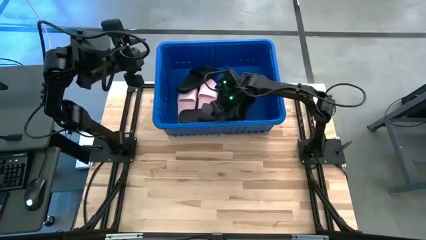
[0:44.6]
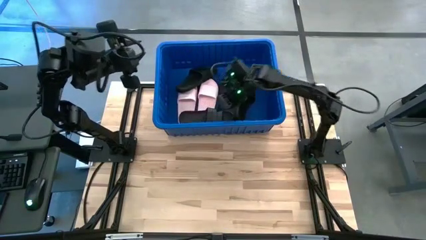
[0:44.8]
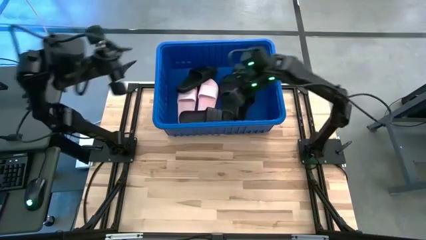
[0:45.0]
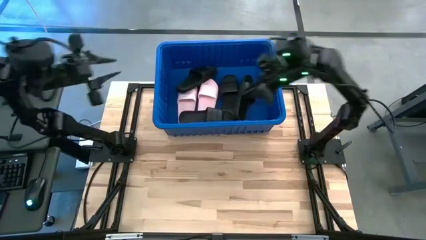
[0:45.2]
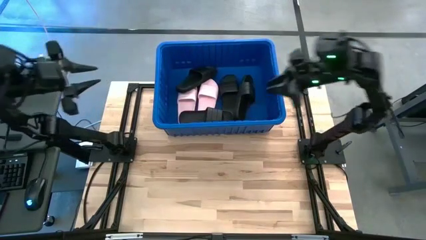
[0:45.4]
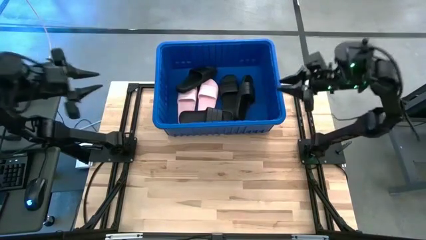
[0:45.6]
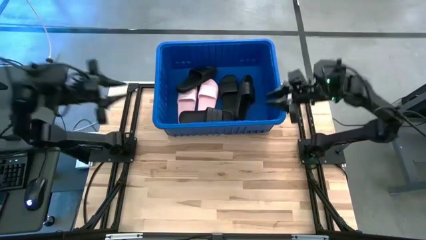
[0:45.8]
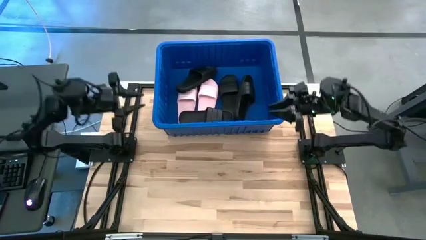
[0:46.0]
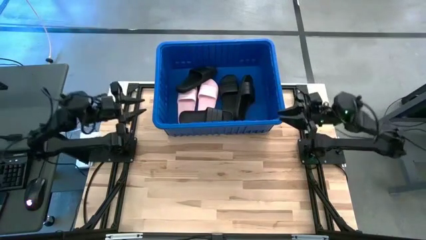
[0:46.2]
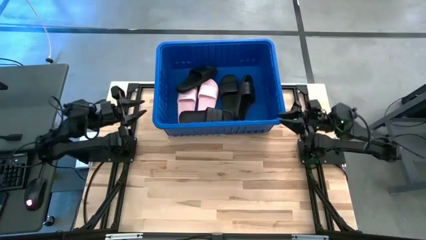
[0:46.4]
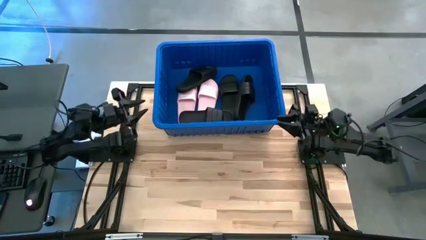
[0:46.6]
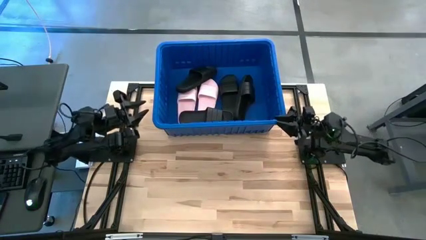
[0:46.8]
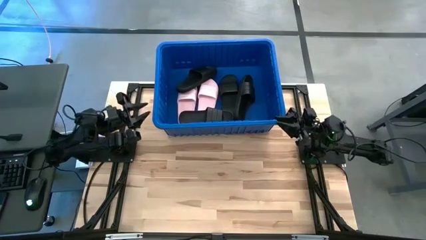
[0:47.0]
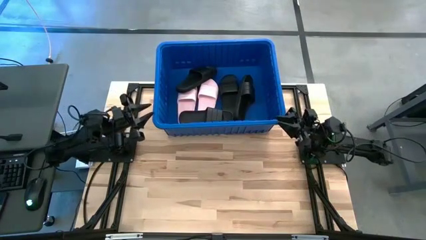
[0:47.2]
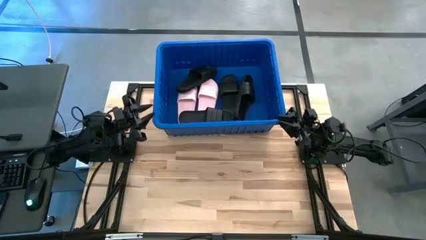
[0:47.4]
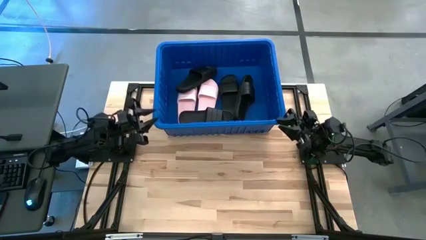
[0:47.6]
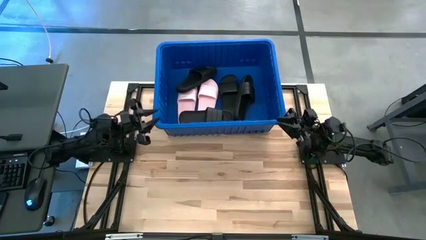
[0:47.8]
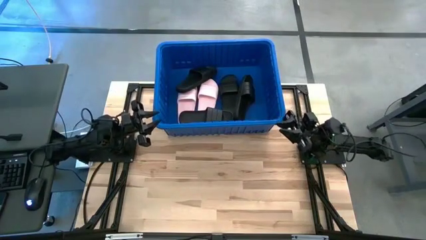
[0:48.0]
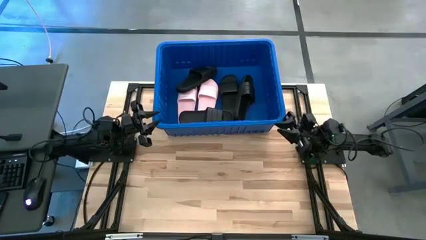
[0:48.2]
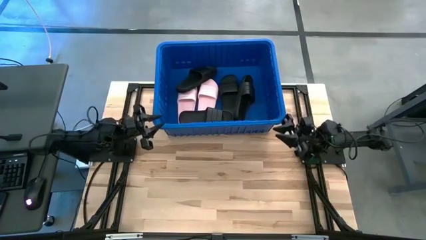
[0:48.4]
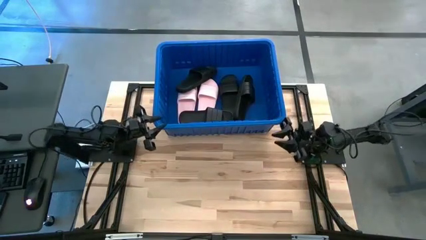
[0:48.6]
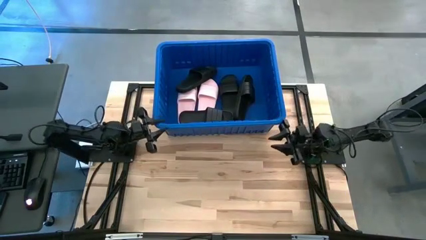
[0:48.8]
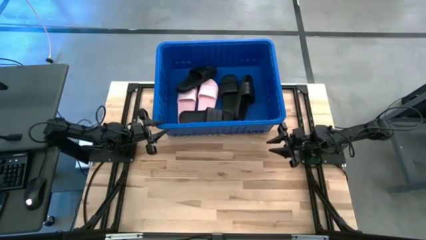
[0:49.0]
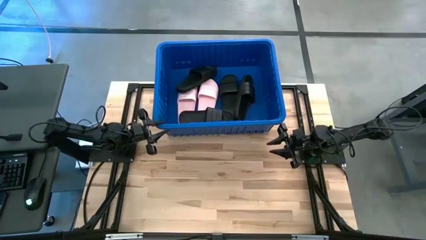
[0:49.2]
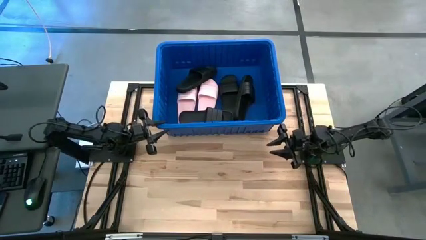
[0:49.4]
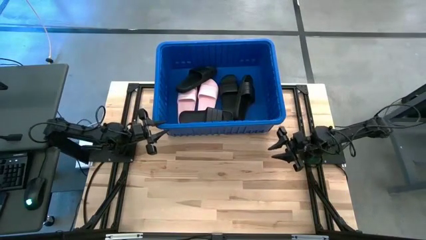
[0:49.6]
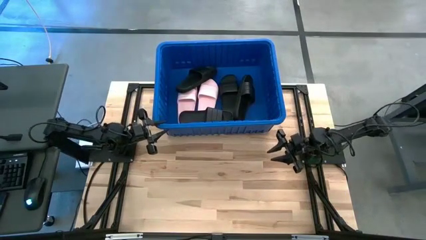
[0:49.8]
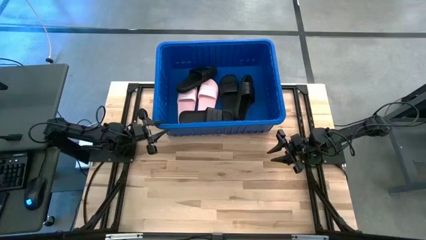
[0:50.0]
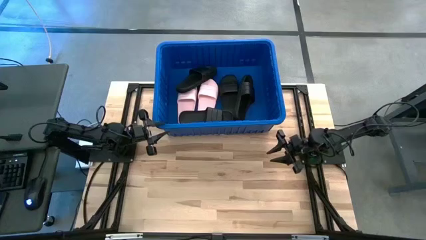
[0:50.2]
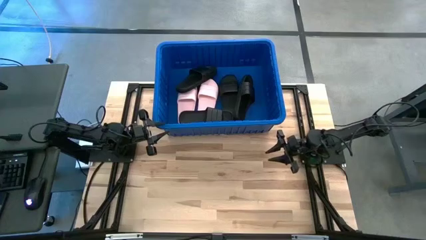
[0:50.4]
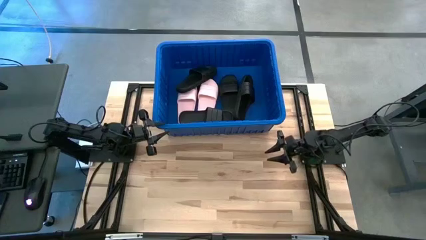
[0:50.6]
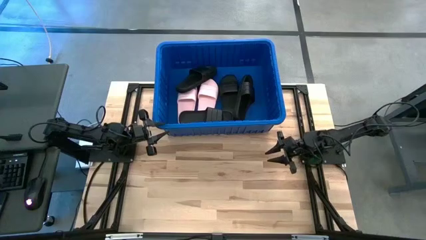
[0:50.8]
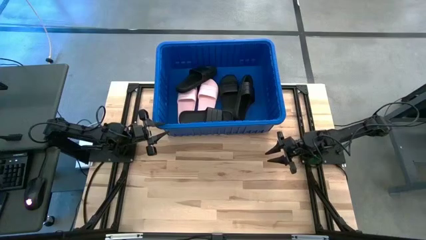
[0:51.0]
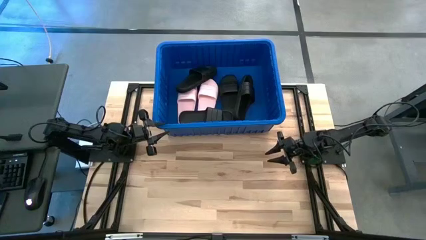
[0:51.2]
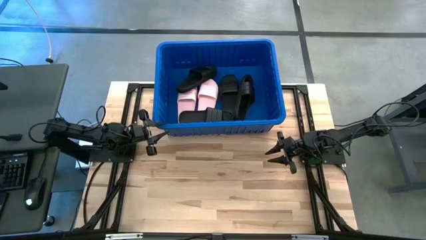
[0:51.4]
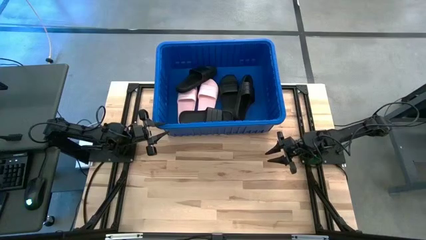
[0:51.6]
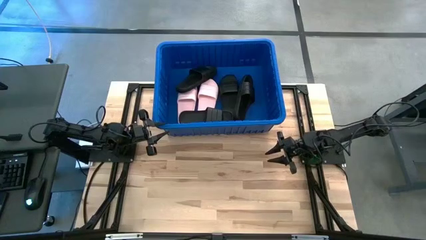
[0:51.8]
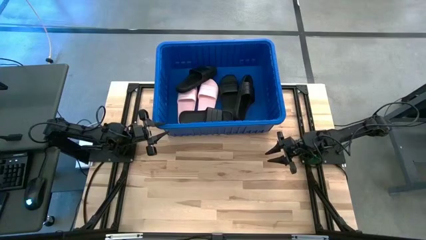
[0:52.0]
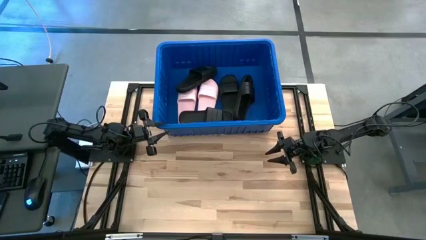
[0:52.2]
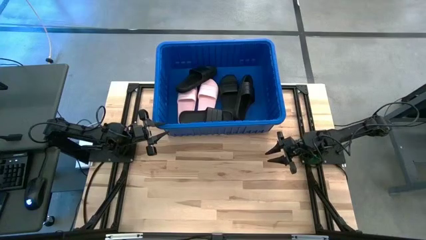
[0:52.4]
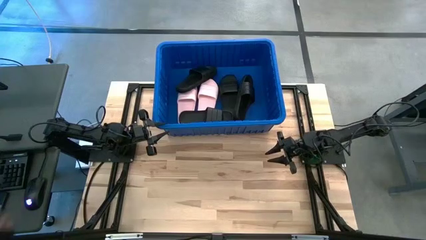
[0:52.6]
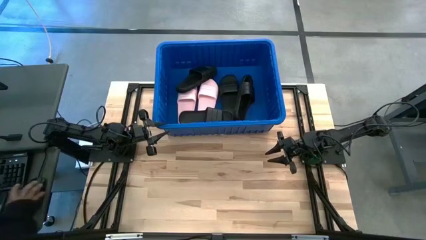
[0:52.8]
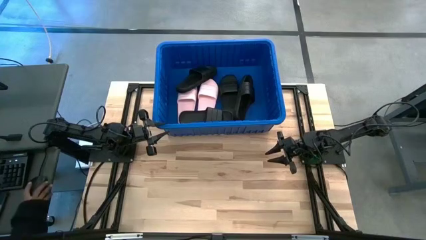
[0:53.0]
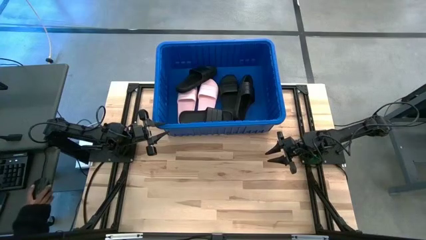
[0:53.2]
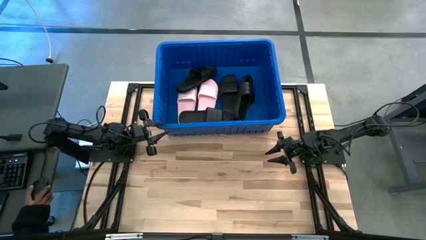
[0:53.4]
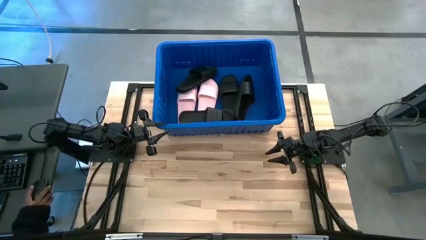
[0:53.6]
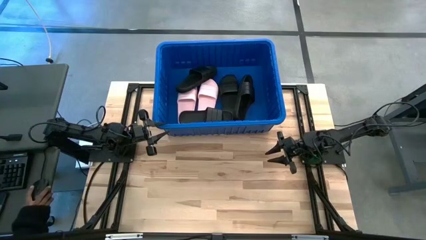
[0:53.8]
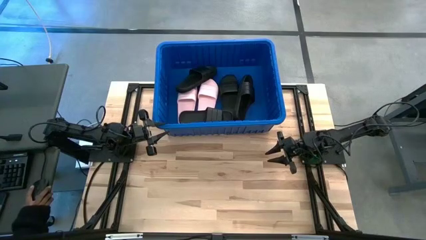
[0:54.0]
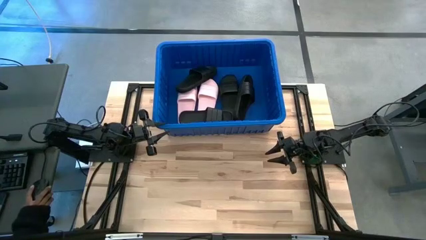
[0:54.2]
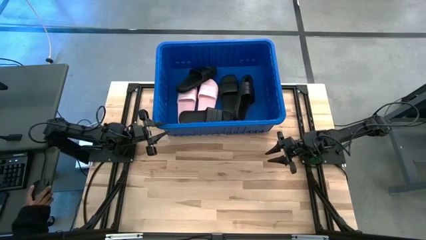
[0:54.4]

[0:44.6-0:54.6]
Task: Pick and place slides into bin
Return to Home Position

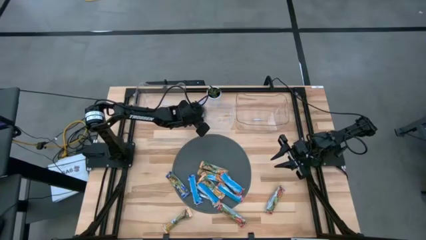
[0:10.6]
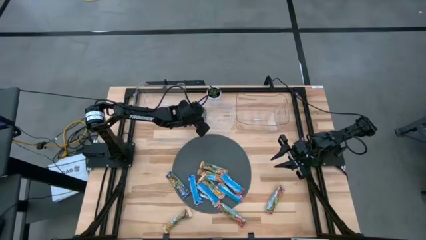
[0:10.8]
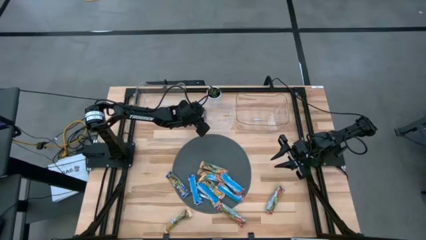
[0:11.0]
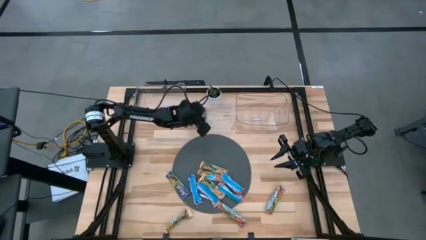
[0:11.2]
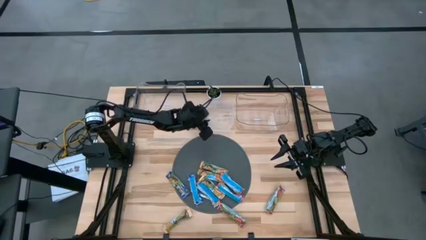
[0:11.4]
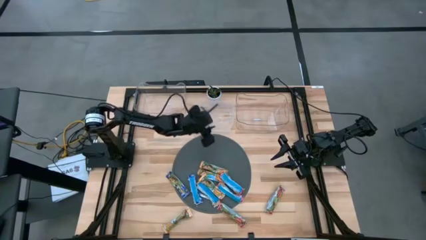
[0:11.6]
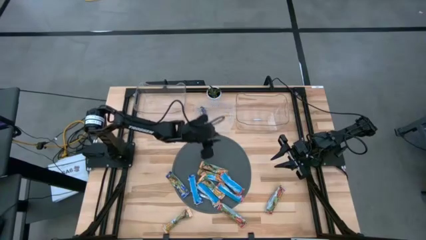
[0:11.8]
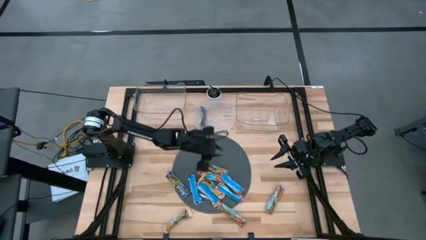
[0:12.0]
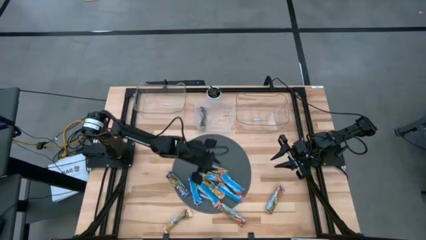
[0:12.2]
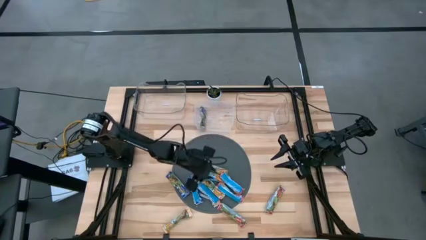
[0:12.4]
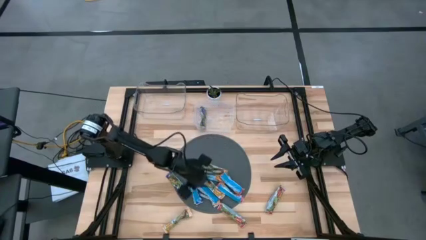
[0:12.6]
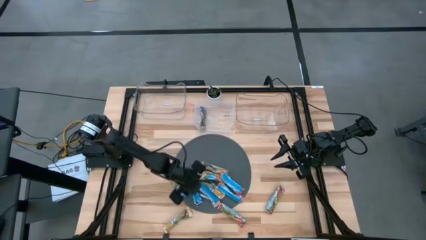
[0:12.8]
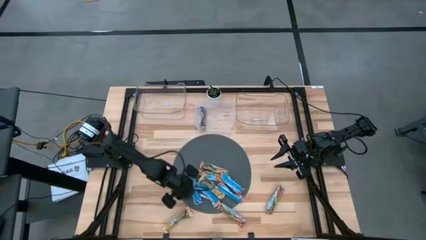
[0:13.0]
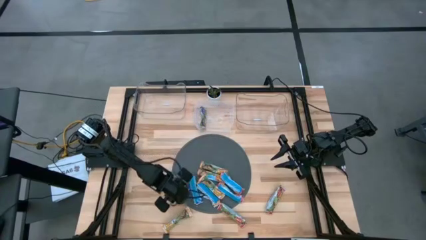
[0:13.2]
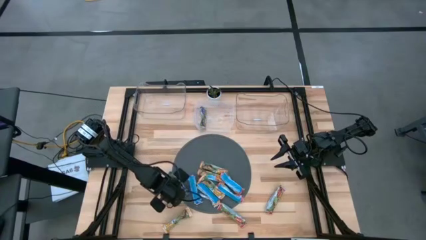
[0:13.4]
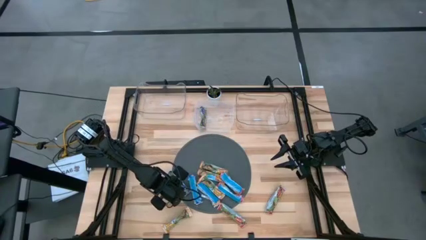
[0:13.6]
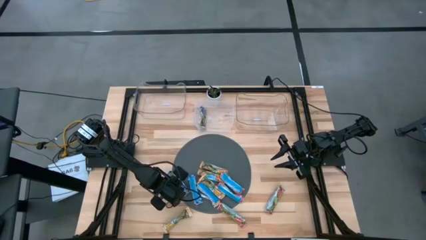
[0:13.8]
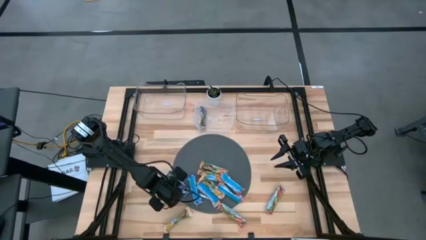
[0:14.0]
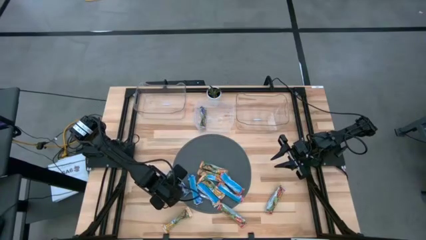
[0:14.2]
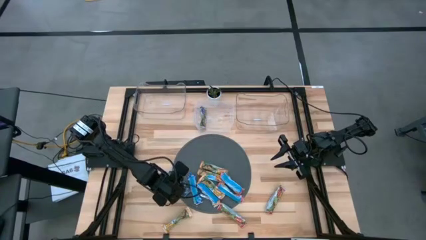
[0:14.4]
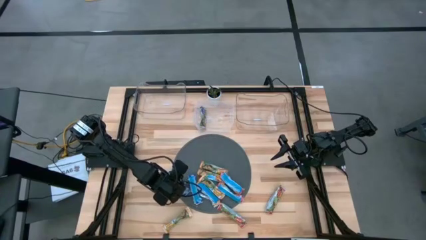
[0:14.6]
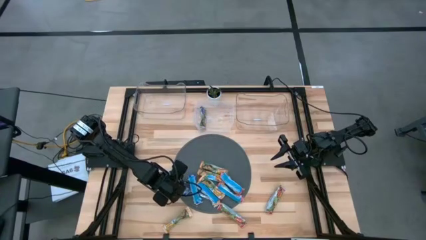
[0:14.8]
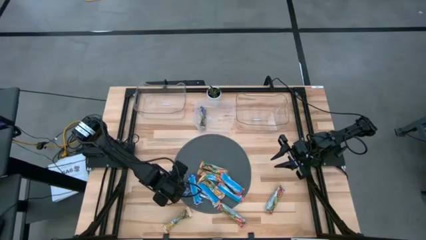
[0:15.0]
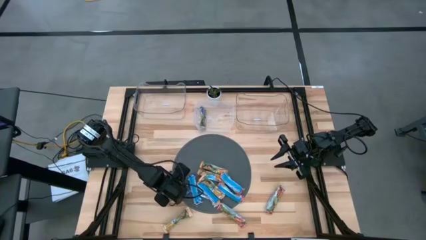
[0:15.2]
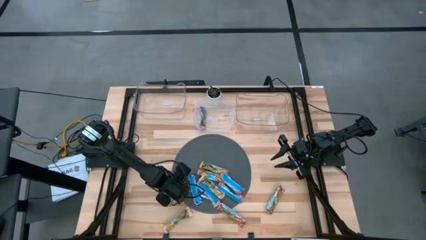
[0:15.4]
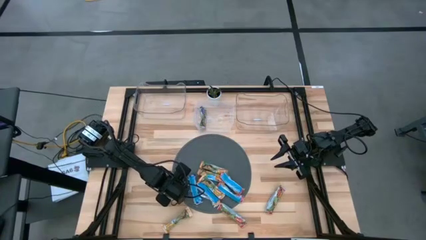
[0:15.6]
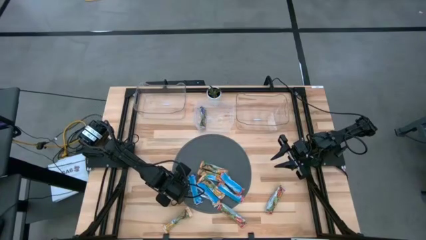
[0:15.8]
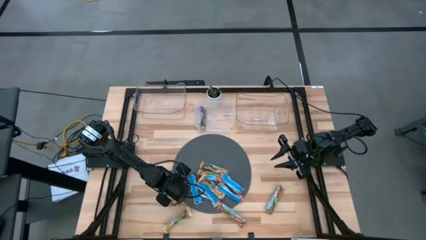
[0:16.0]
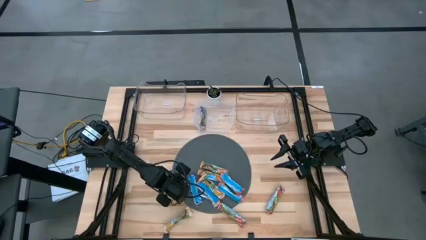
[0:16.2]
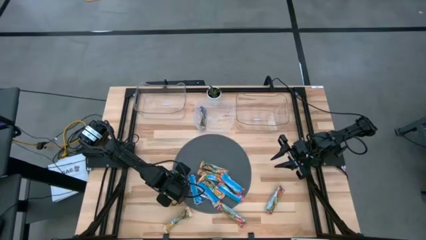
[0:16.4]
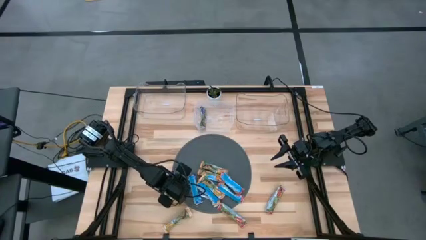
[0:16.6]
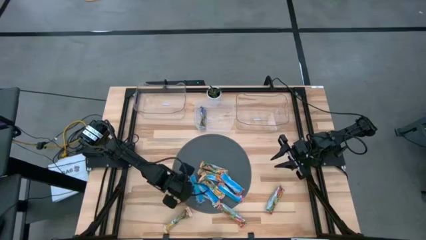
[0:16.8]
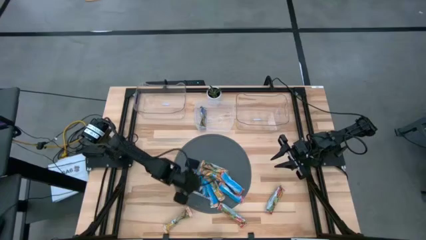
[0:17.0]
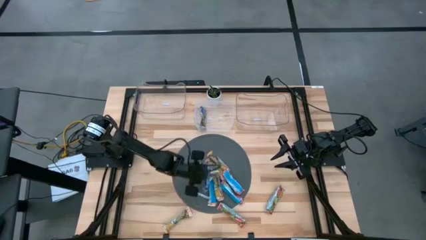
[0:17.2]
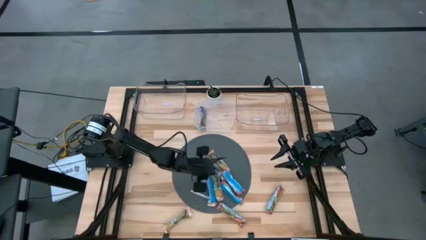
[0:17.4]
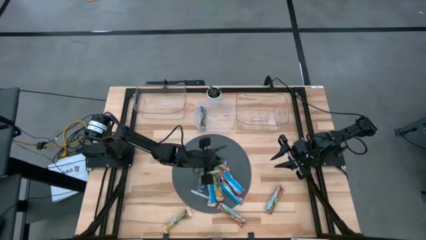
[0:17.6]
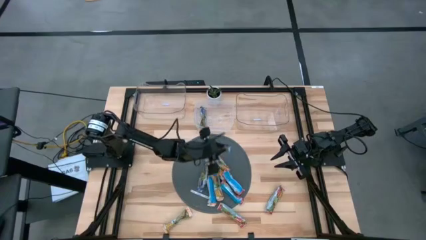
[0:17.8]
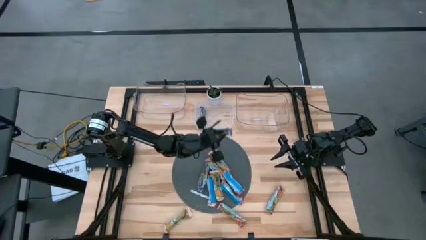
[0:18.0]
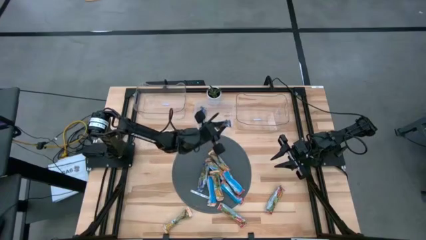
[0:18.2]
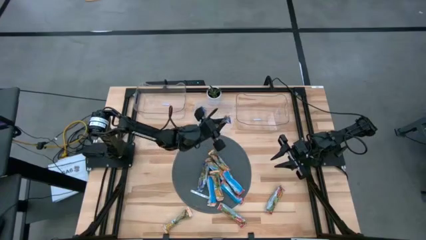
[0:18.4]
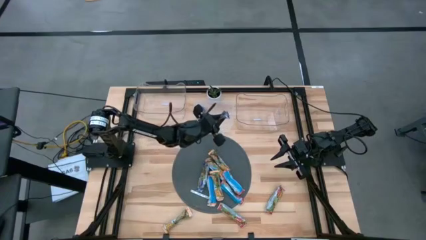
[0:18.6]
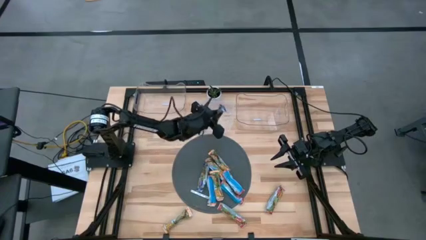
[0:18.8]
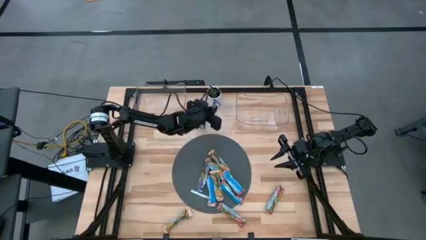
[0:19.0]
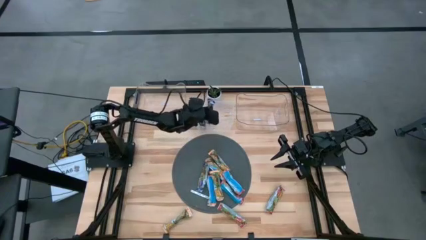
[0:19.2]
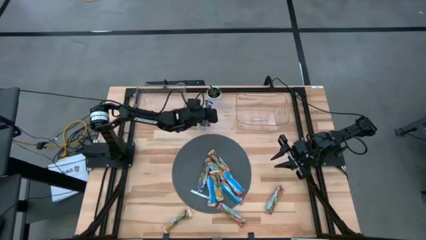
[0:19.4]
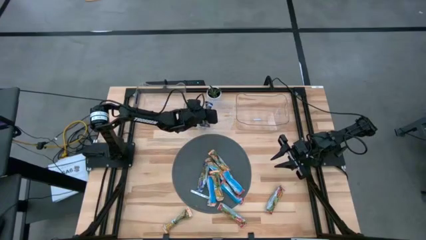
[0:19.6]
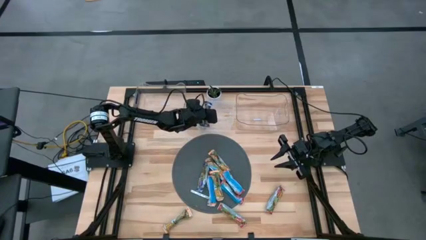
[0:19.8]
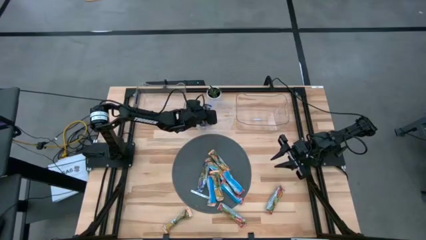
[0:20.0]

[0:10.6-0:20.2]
Task: Pick and place Granola Bars by type
Put the blue granola bar into the middle transparent bin
